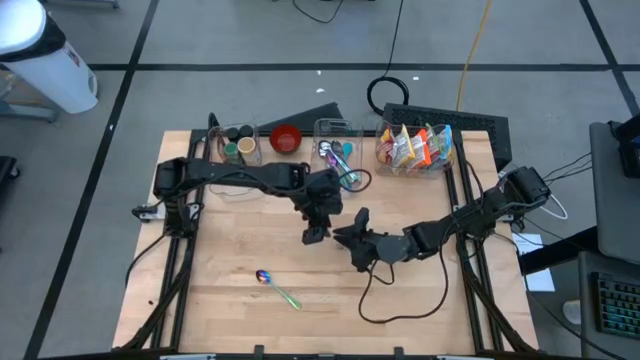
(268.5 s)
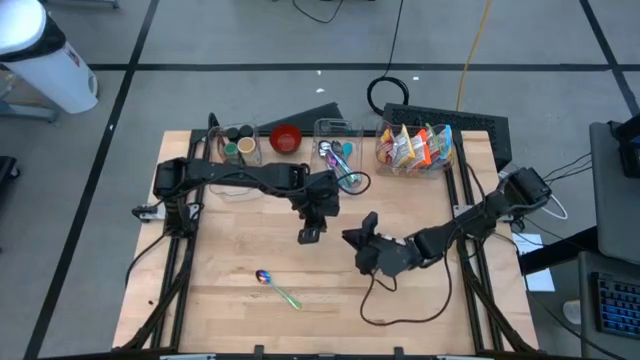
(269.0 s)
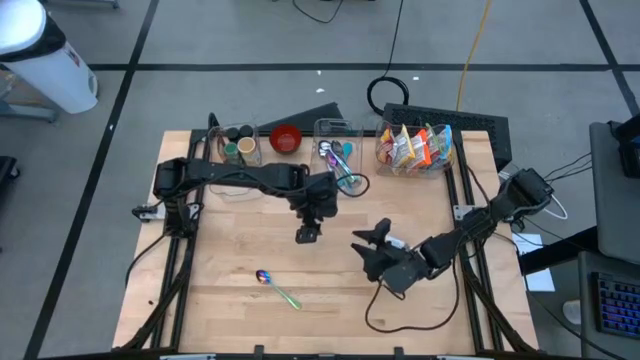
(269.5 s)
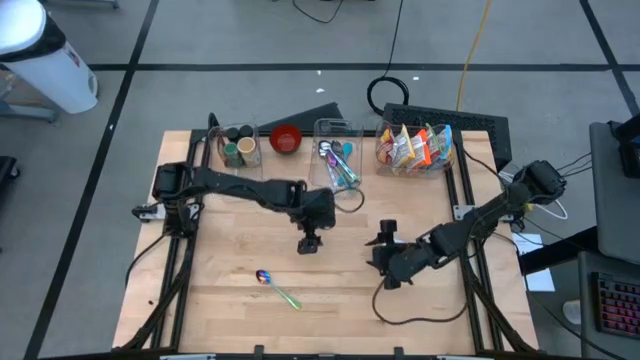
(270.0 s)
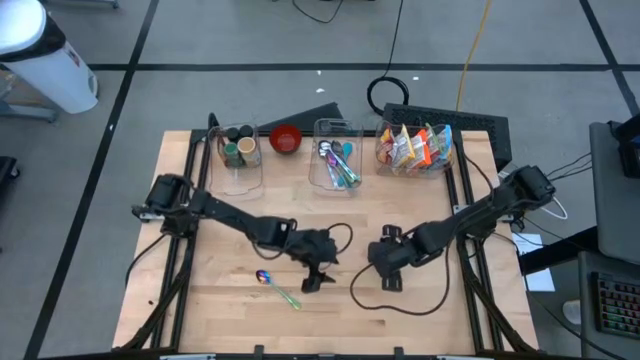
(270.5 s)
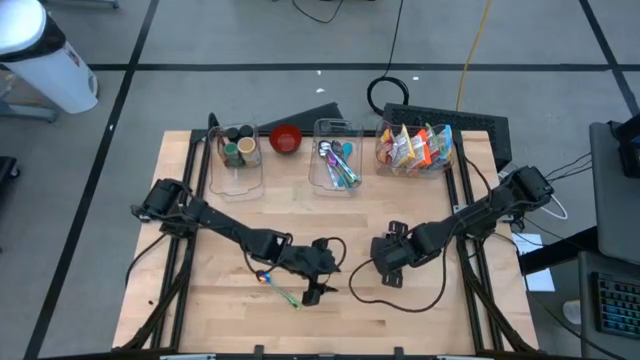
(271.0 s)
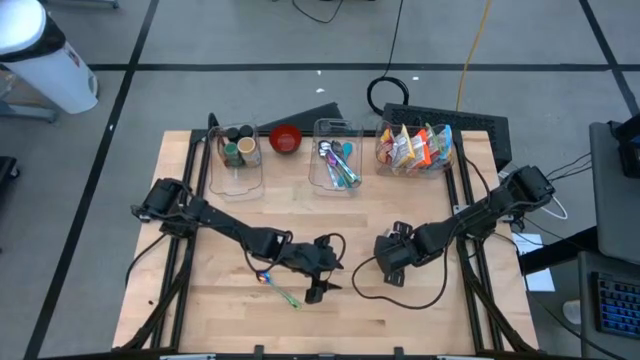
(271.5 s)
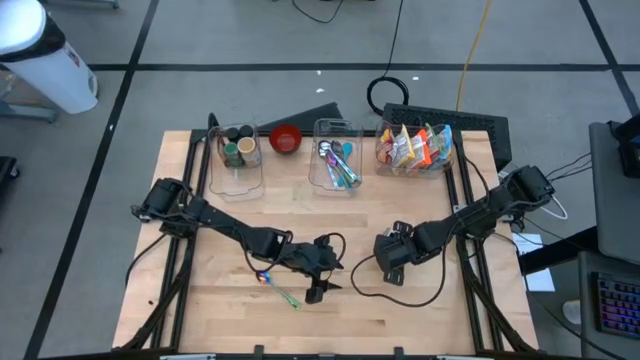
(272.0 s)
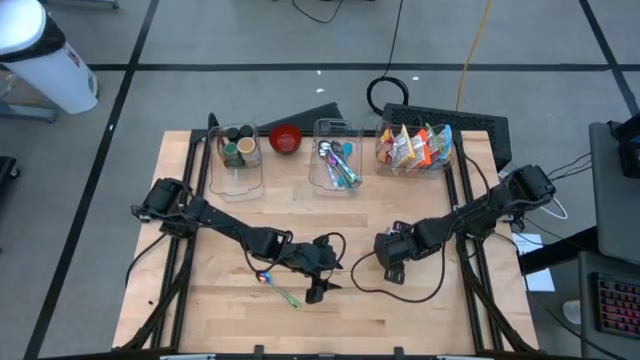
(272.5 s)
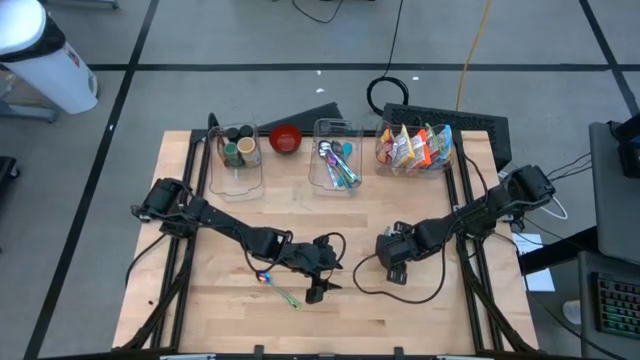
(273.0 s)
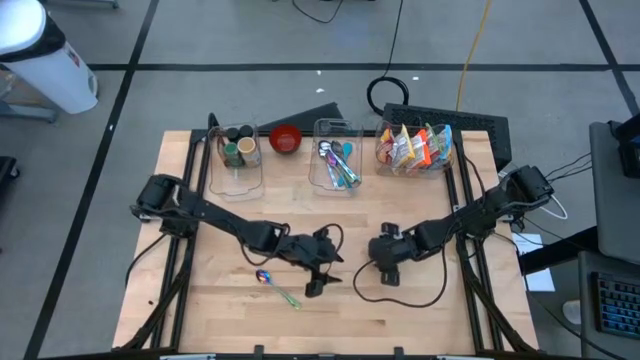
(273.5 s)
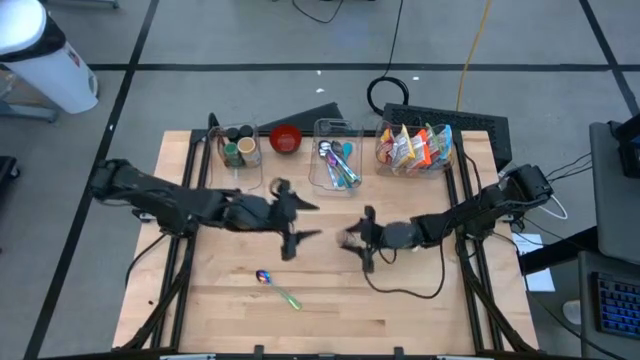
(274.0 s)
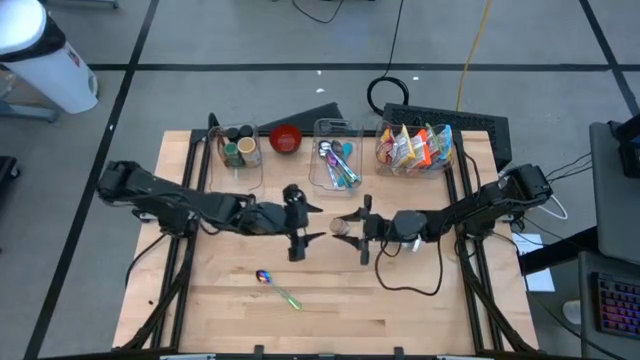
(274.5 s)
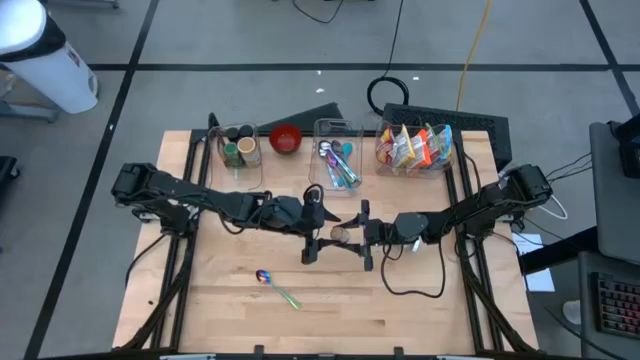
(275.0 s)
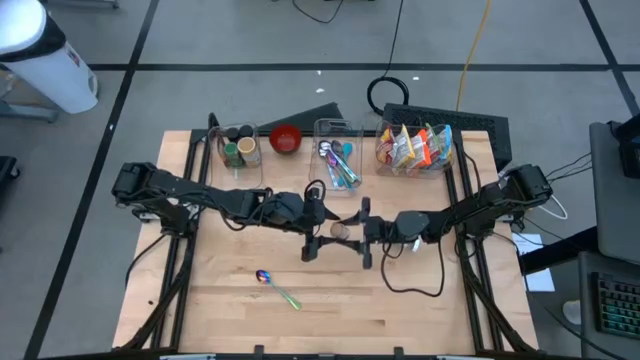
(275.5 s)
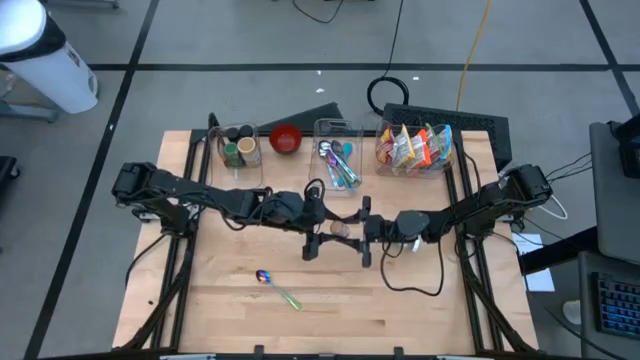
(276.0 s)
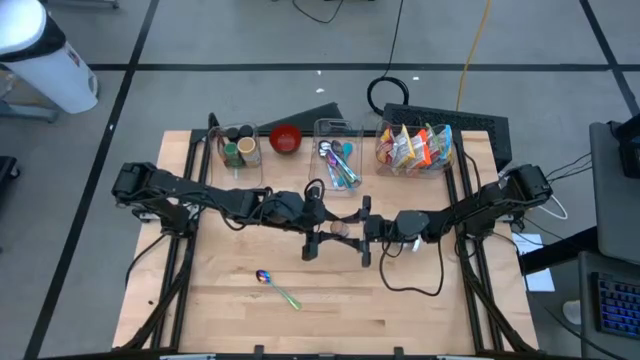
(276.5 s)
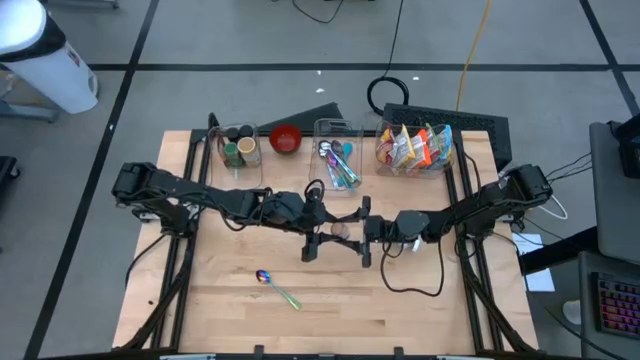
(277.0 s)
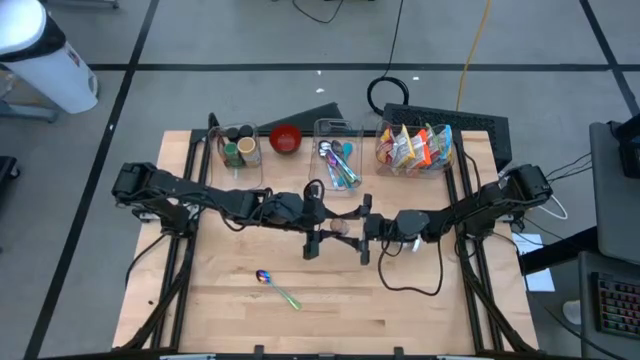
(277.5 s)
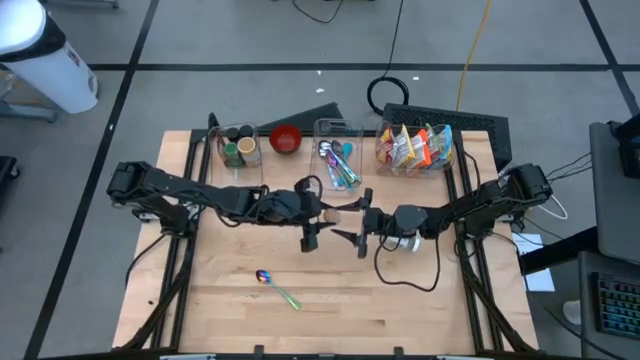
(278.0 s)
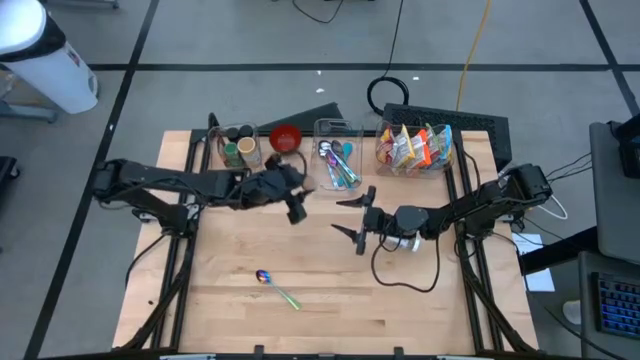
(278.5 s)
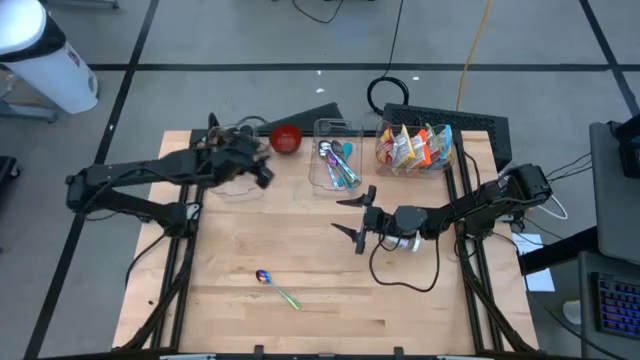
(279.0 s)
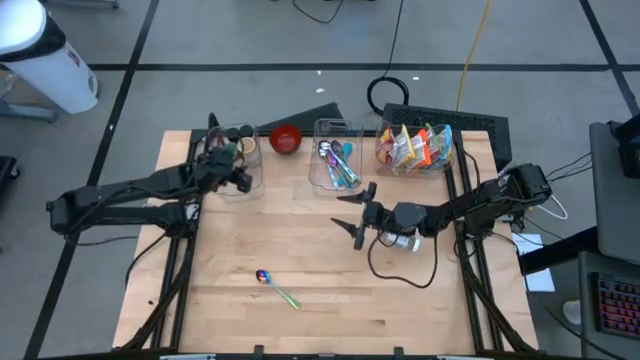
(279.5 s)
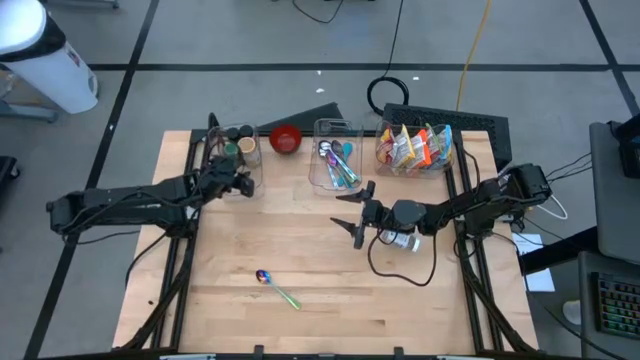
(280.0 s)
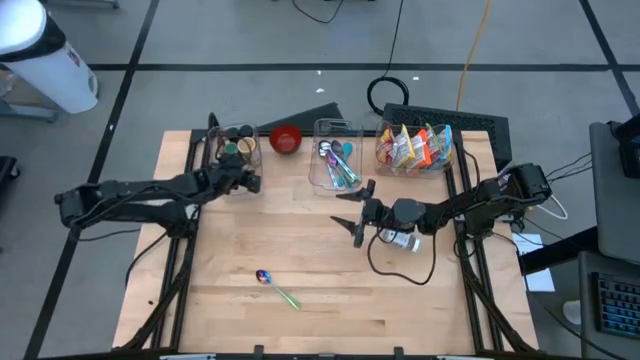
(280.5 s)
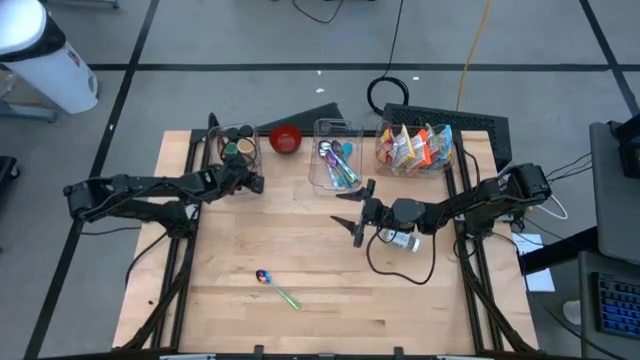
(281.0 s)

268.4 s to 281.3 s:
Task: Pick & Place Food Item
Put the yellow and white seasoning bottle into the left transparent bin

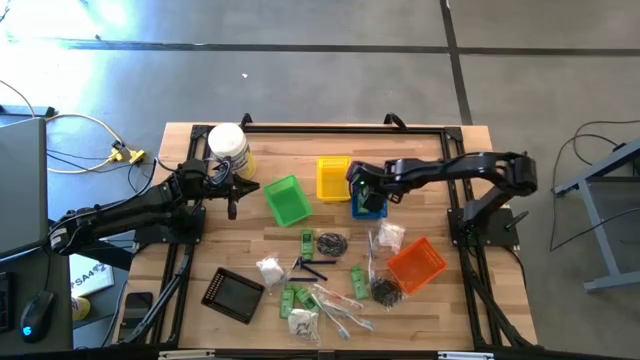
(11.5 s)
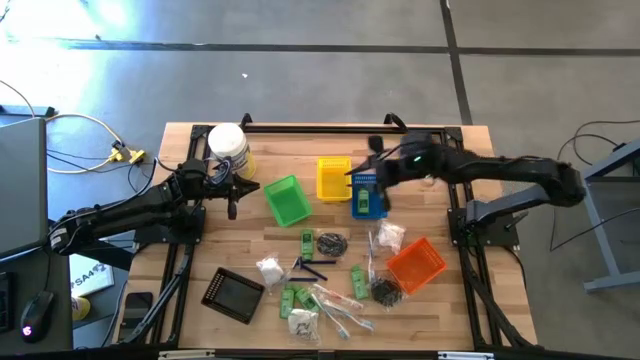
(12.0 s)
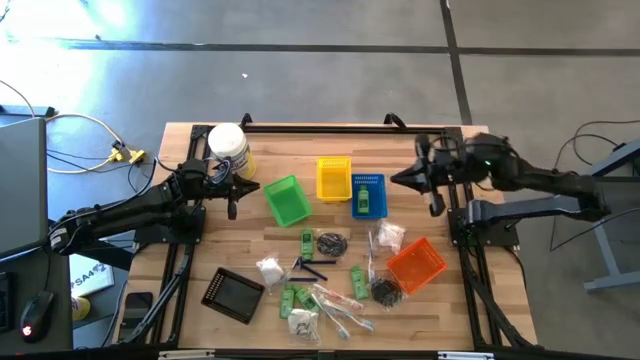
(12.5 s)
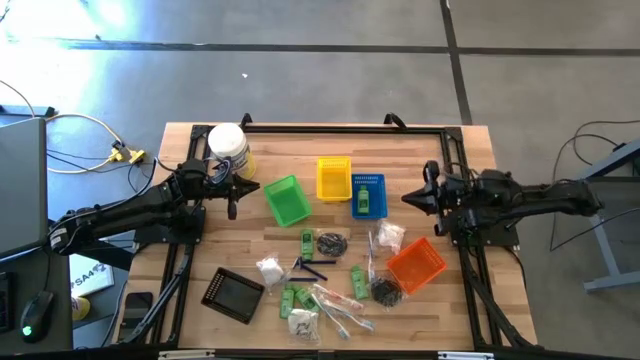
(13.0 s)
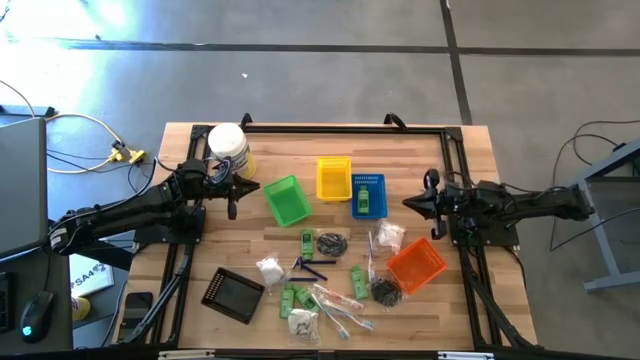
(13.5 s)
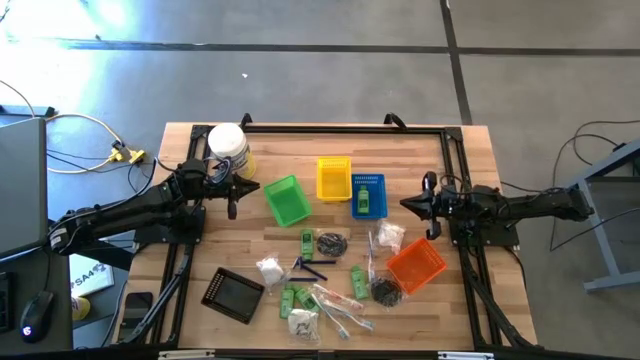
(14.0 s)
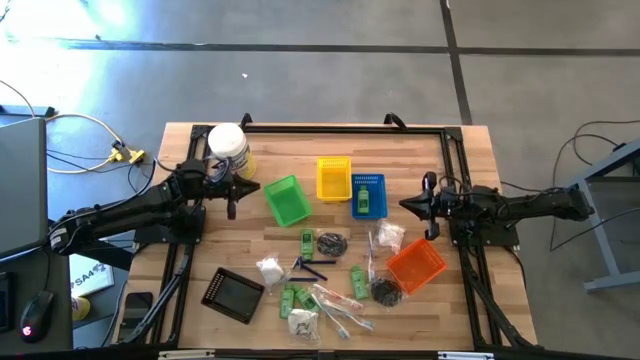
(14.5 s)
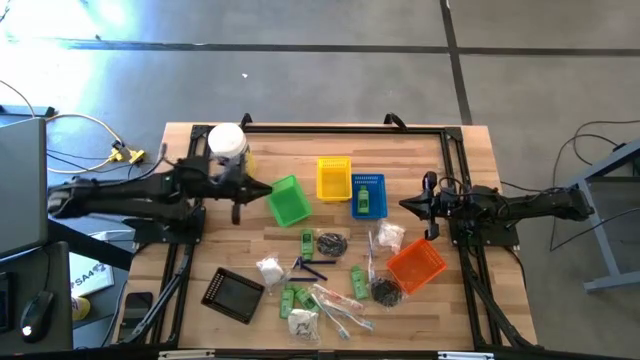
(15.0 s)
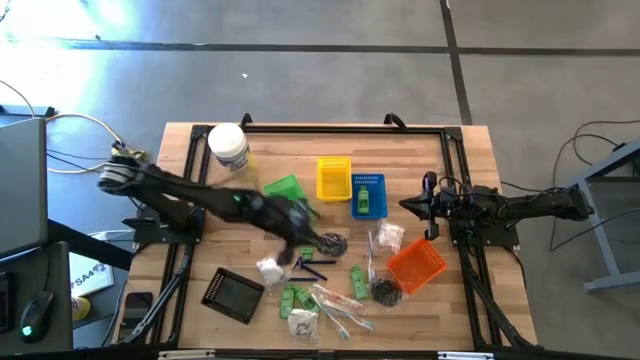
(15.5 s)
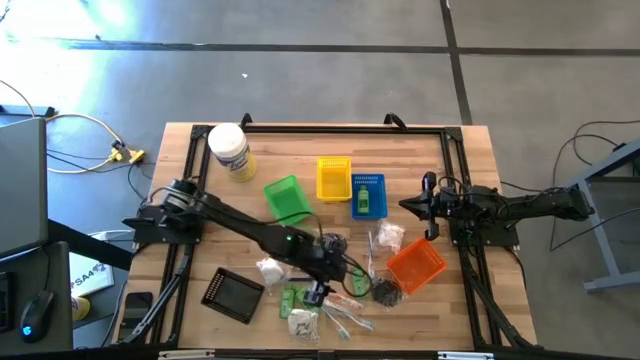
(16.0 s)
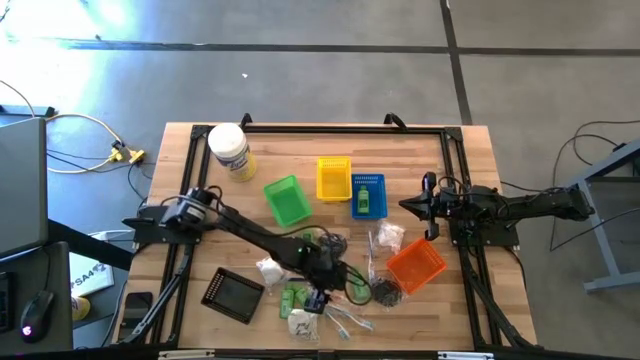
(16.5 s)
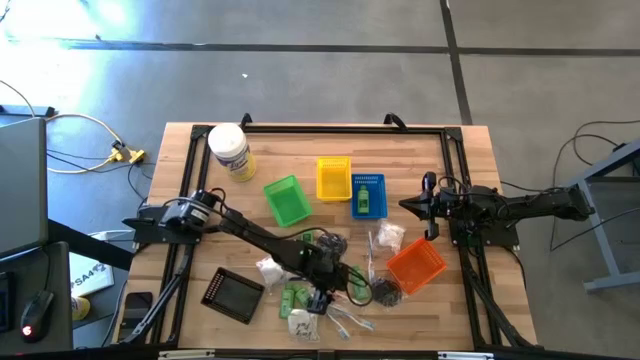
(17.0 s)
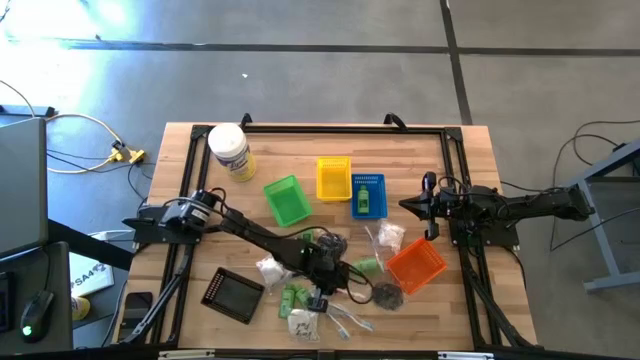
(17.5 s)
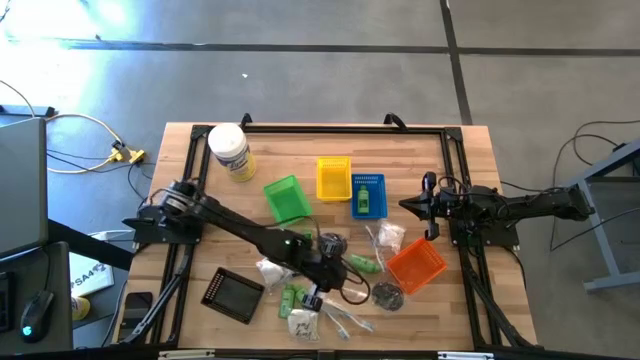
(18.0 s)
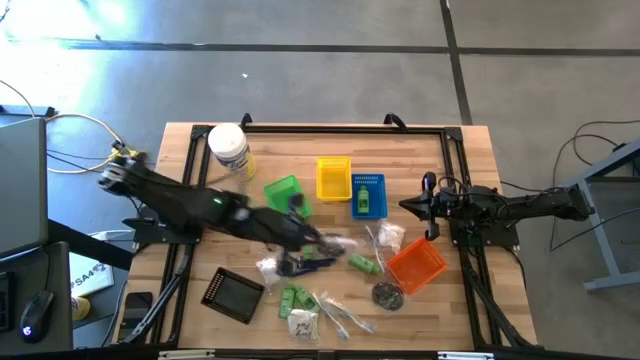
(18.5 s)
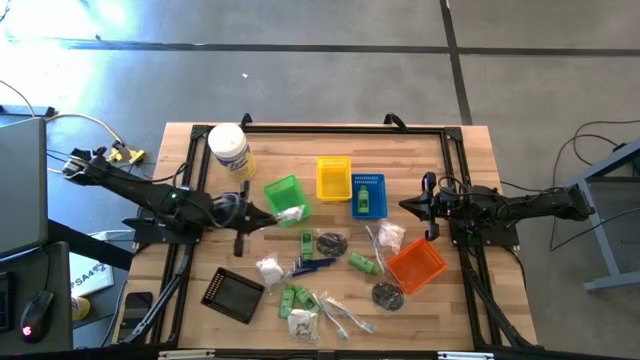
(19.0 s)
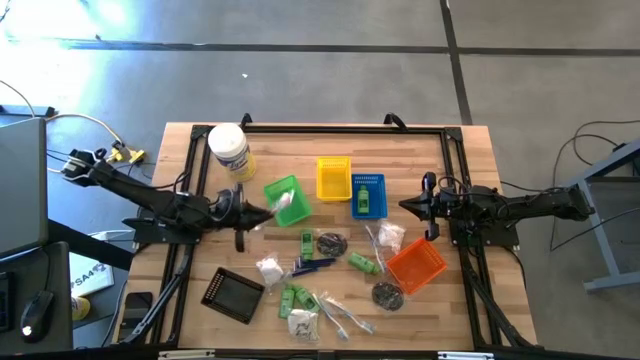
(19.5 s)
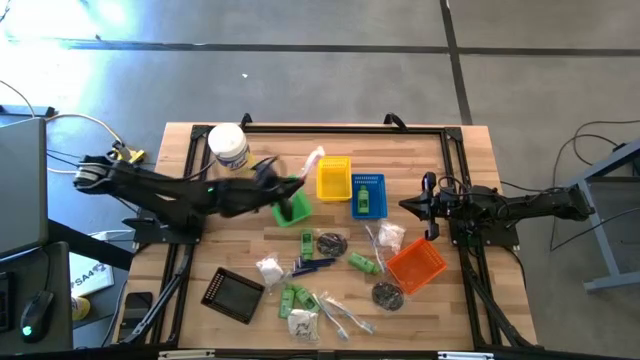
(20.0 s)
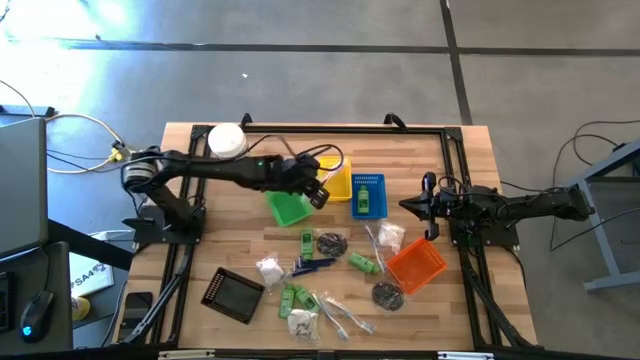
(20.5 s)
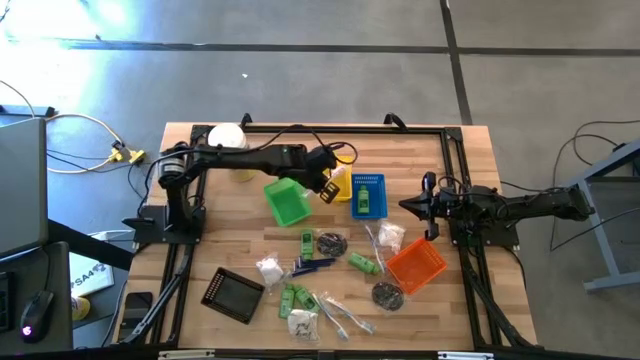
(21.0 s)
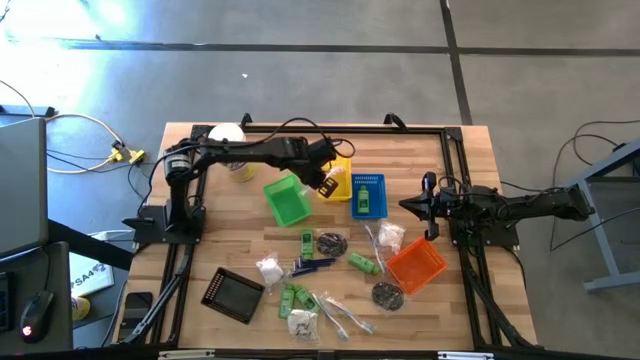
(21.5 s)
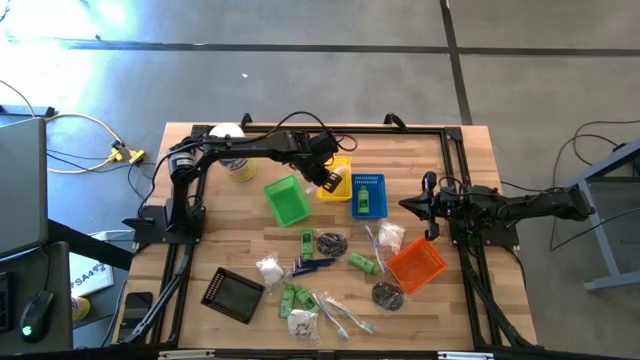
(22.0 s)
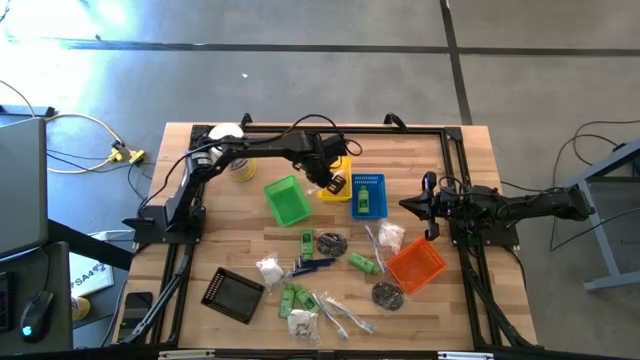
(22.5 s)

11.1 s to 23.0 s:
Task: Pick & Place Travel size toiletries
Put the red toothbrush into the yellow basket
